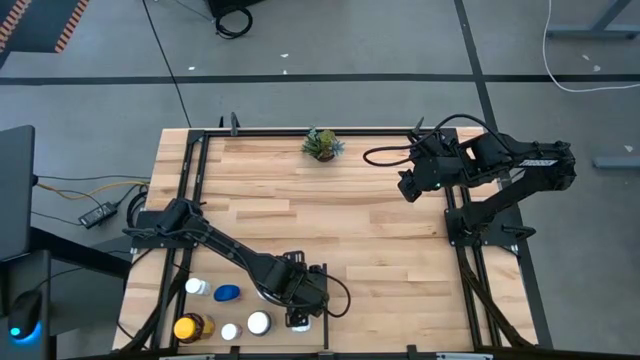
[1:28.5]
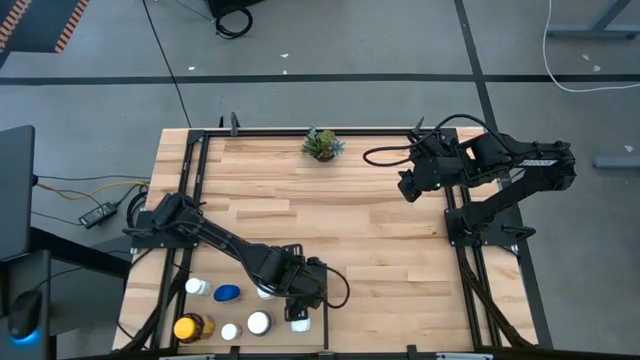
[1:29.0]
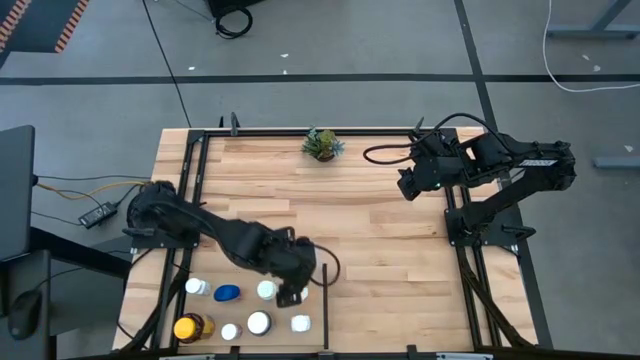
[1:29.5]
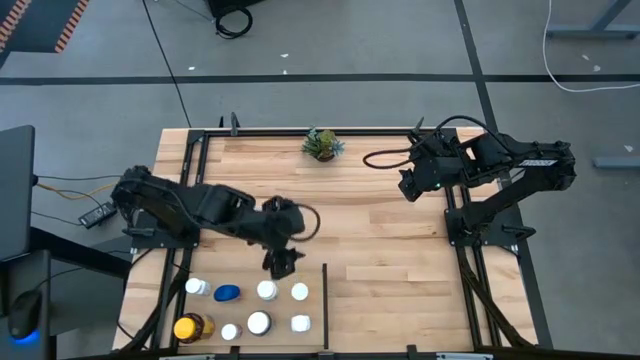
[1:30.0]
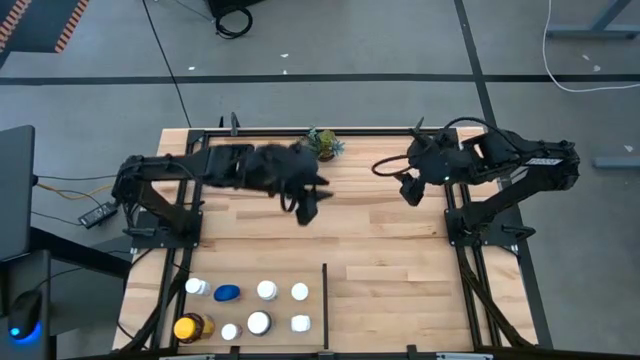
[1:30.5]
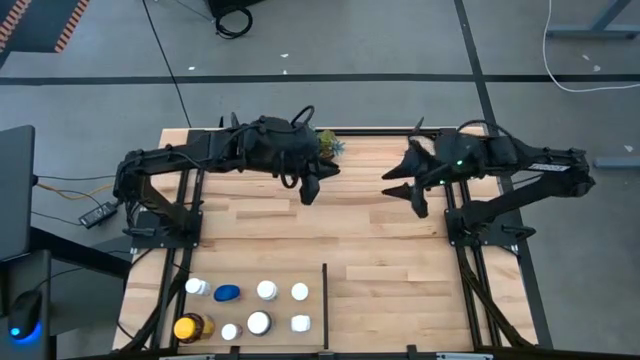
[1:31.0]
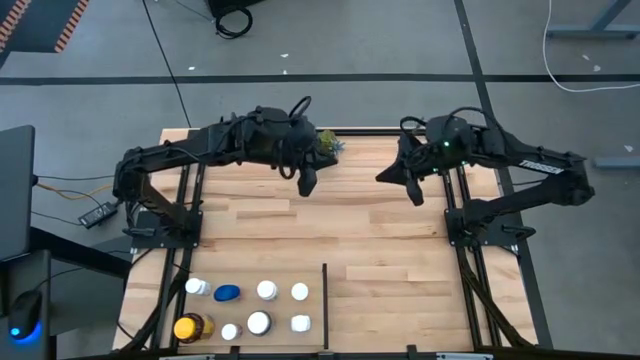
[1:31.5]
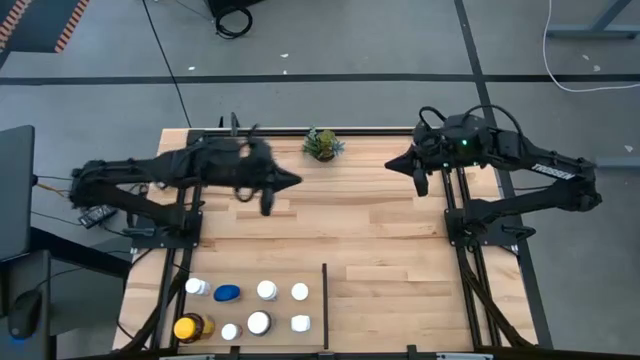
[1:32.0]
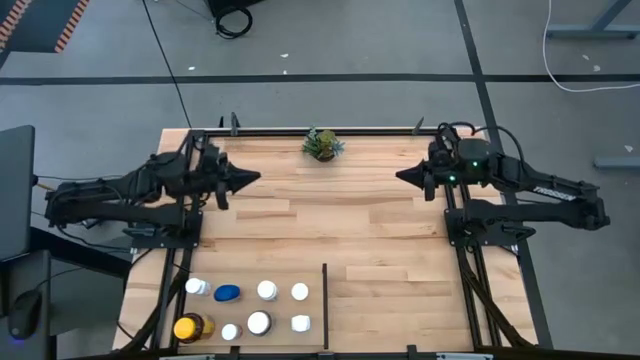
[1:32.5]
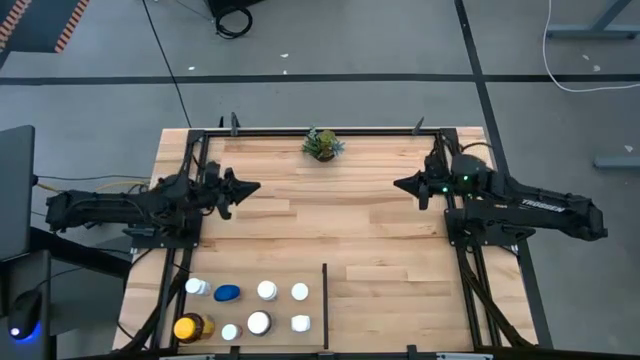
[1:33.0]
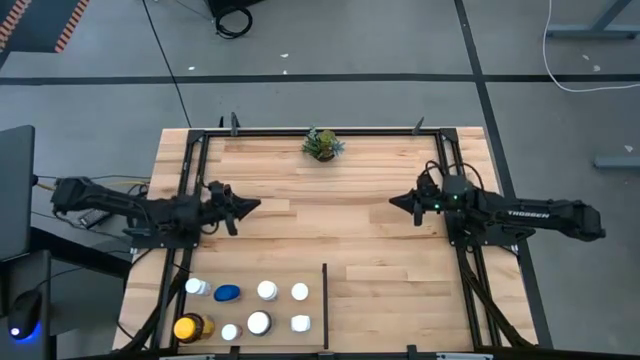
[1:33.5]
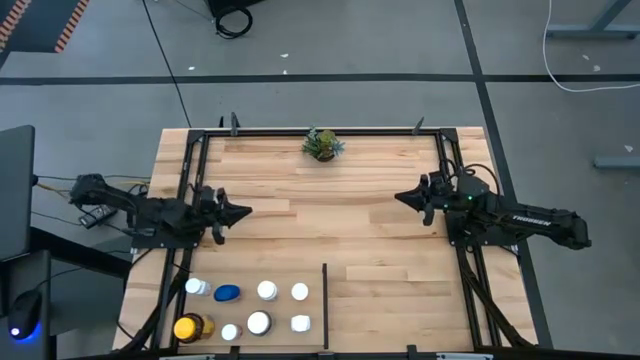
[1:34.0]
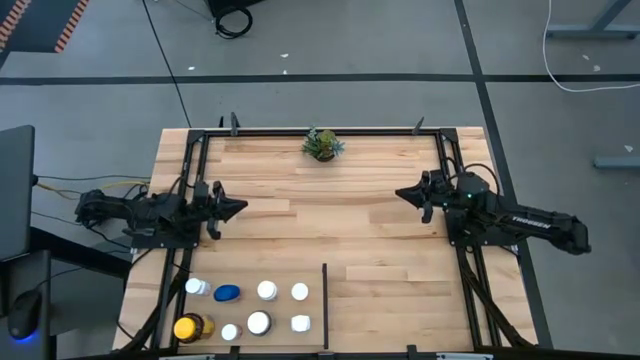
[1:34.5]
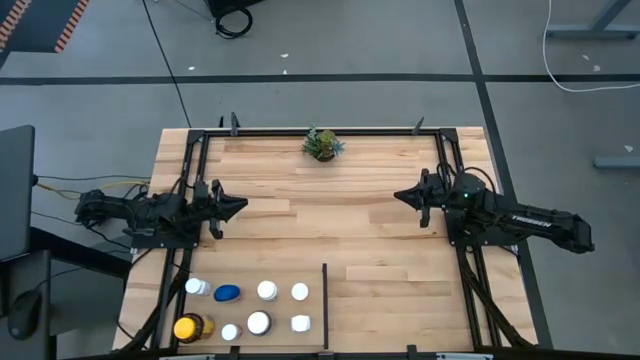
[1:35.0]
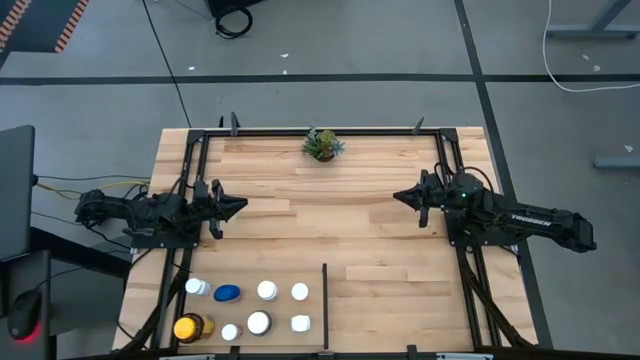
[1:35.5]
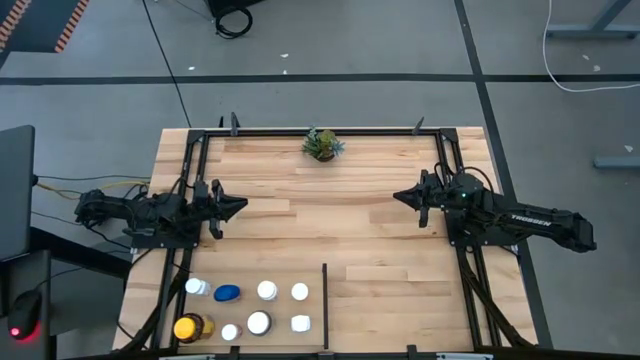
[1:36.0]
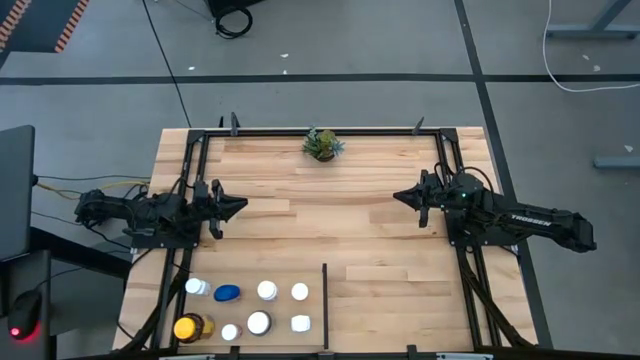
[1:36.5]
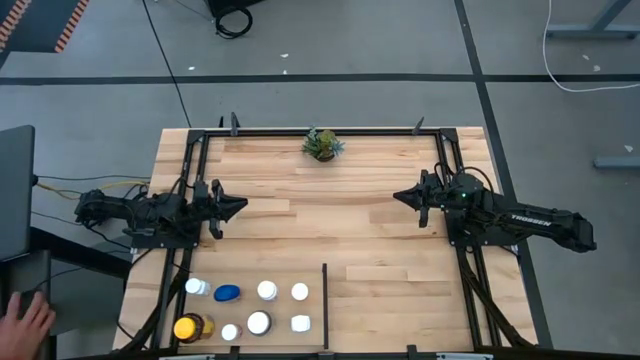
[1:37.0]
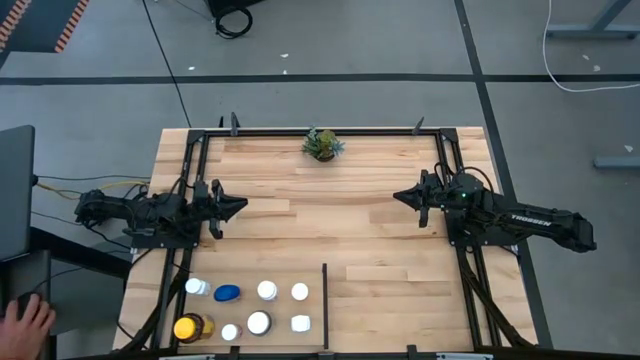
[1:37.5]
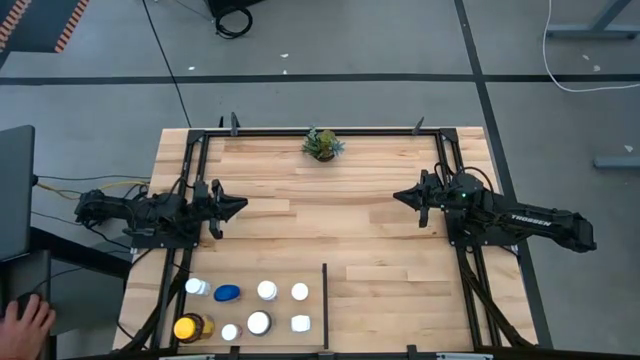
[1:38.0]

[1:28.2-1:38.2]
Task: Pick and place medicine bottles onto shelf by color
Return to Home Position

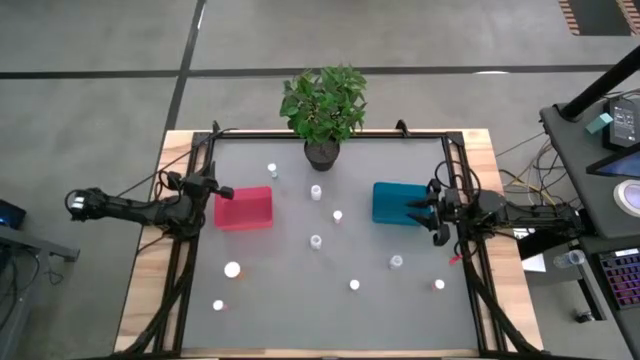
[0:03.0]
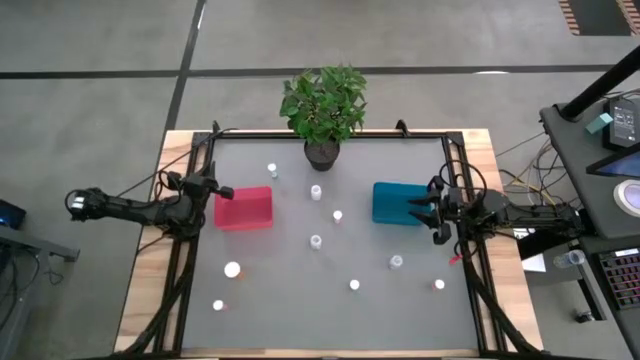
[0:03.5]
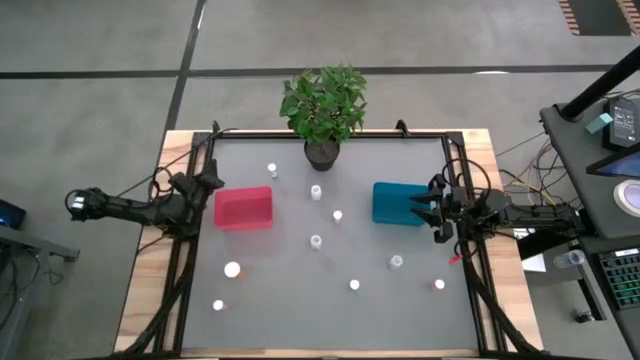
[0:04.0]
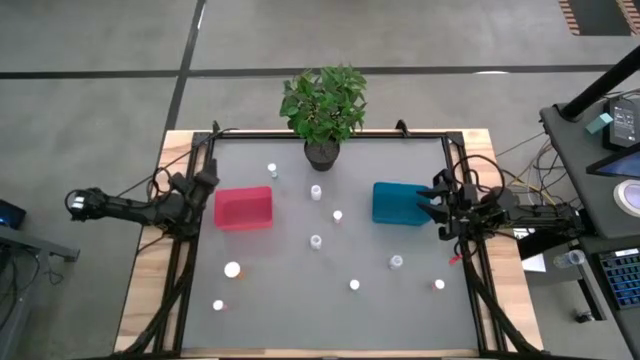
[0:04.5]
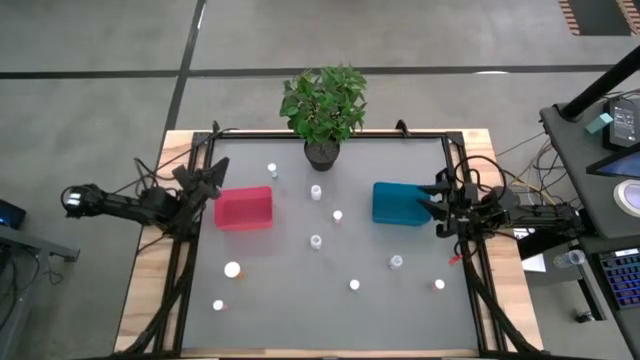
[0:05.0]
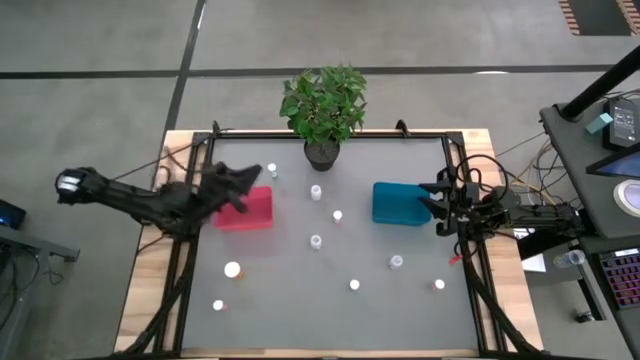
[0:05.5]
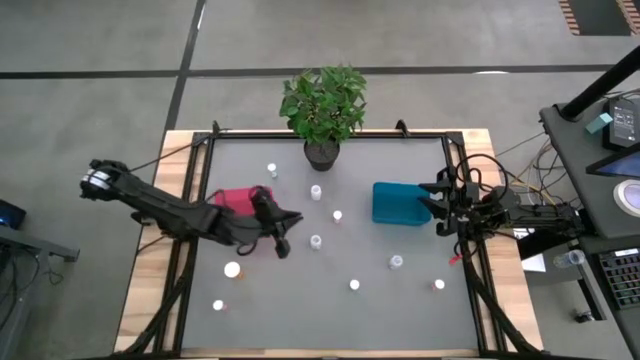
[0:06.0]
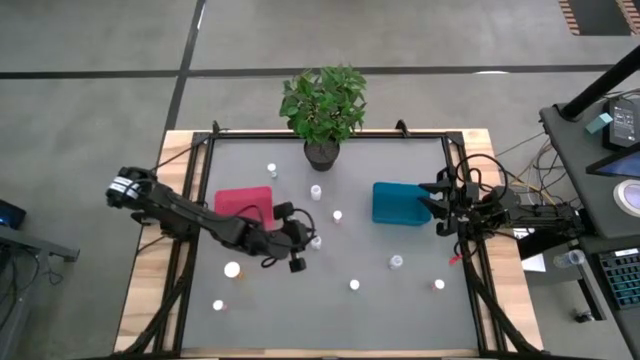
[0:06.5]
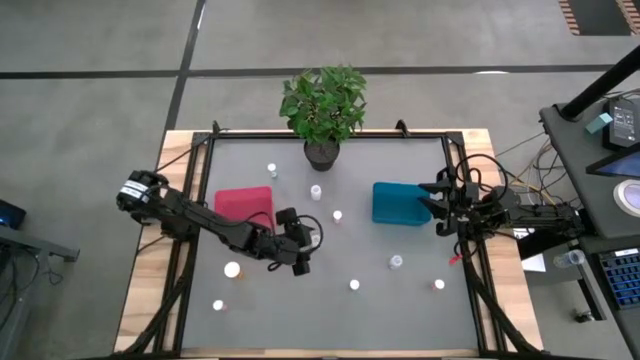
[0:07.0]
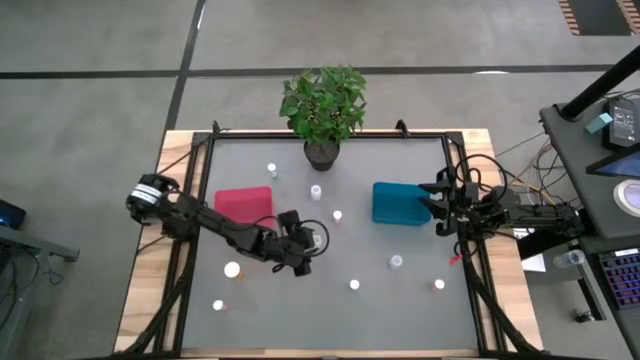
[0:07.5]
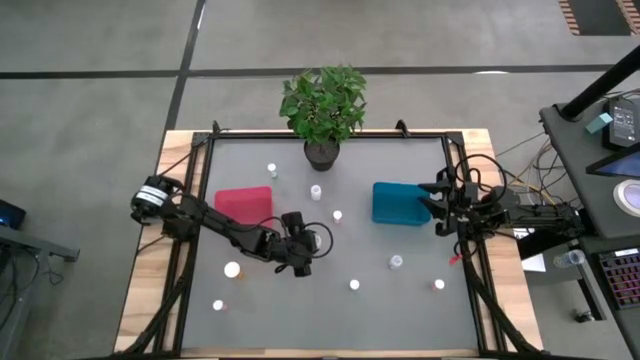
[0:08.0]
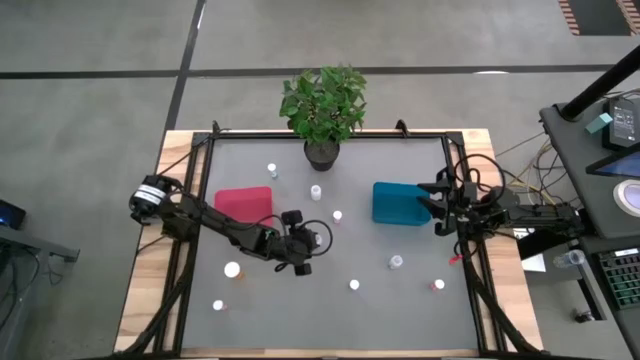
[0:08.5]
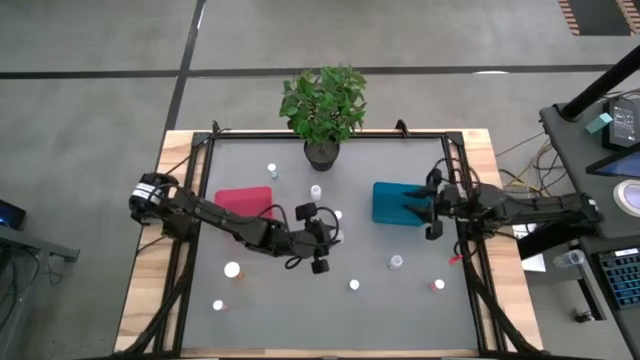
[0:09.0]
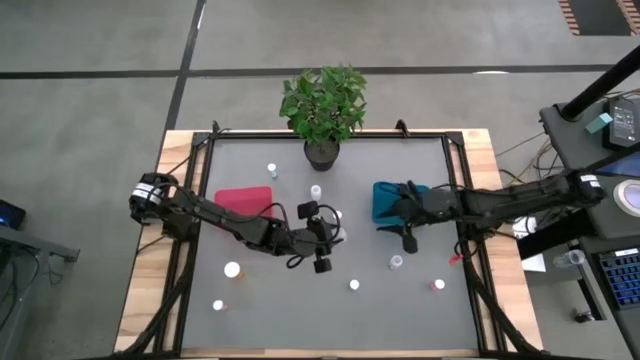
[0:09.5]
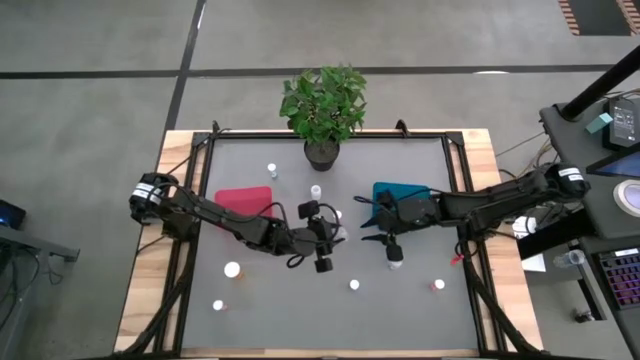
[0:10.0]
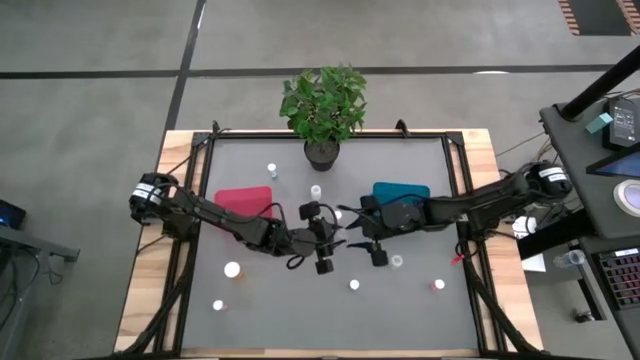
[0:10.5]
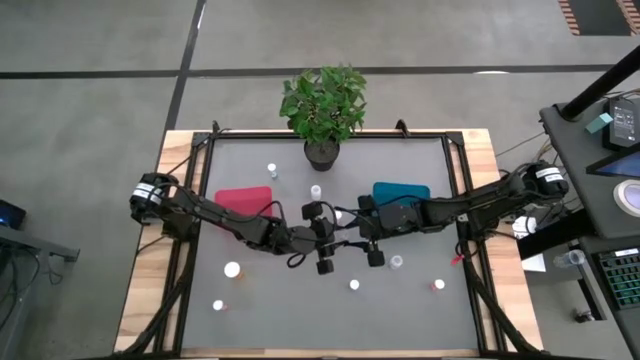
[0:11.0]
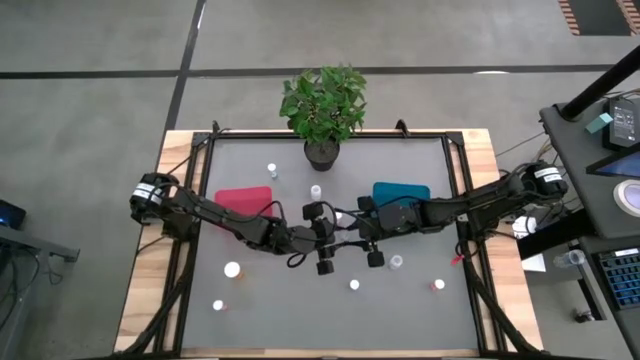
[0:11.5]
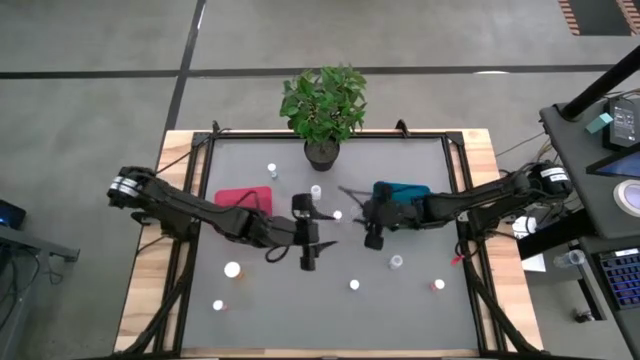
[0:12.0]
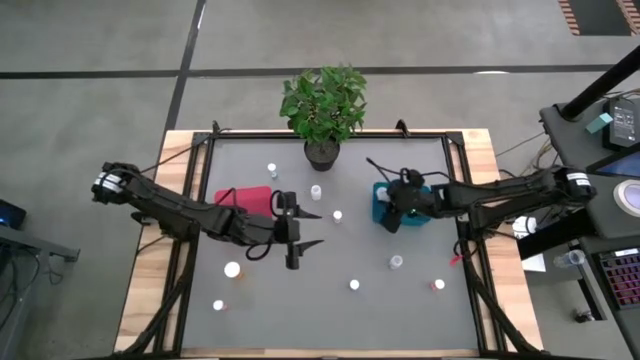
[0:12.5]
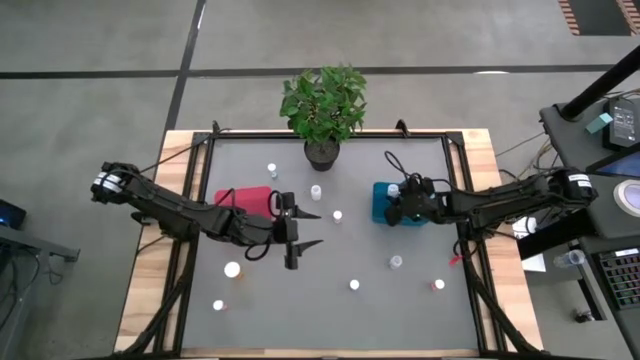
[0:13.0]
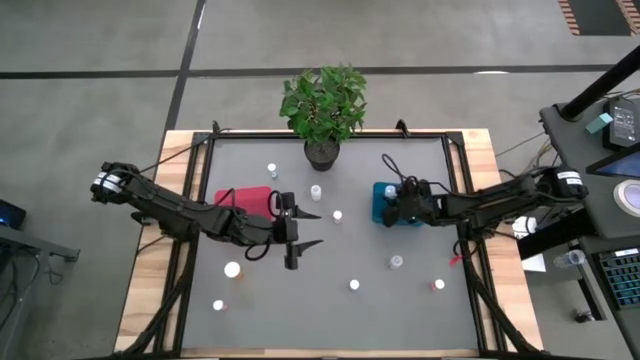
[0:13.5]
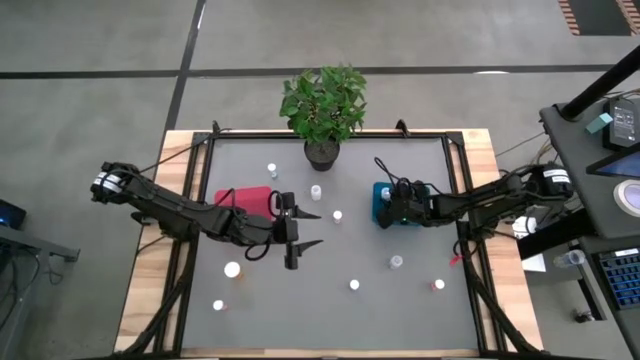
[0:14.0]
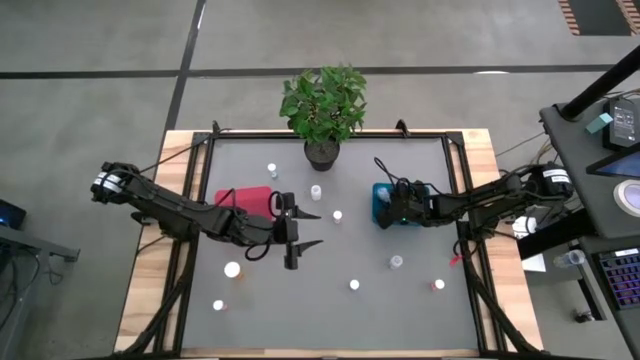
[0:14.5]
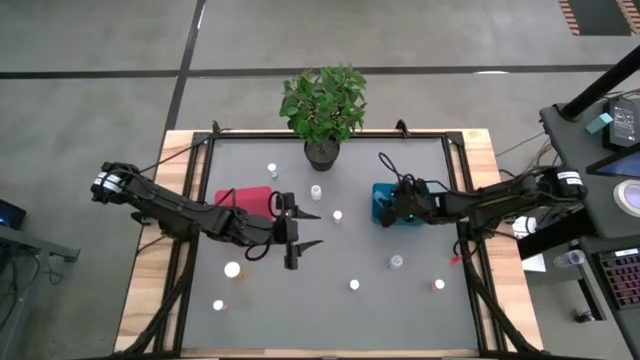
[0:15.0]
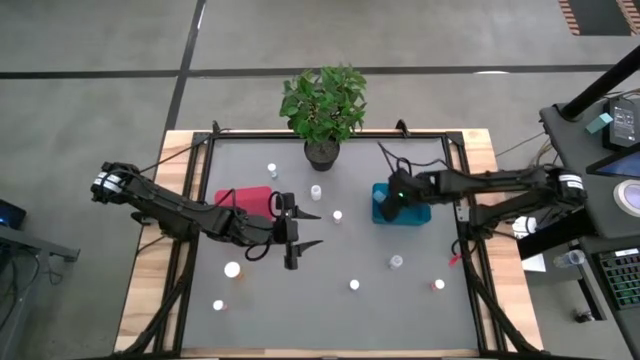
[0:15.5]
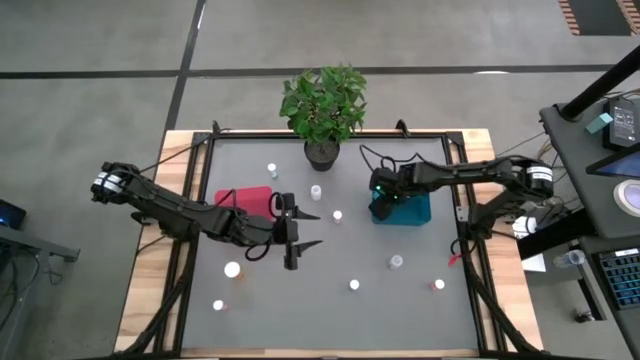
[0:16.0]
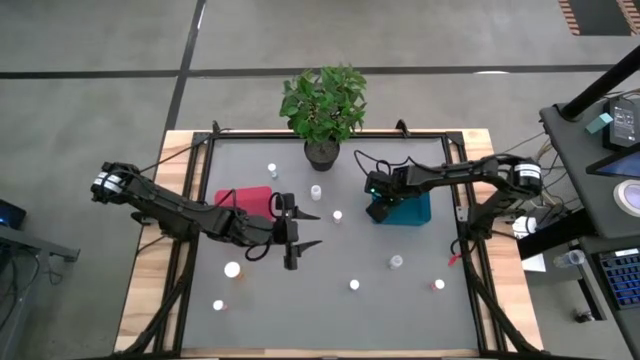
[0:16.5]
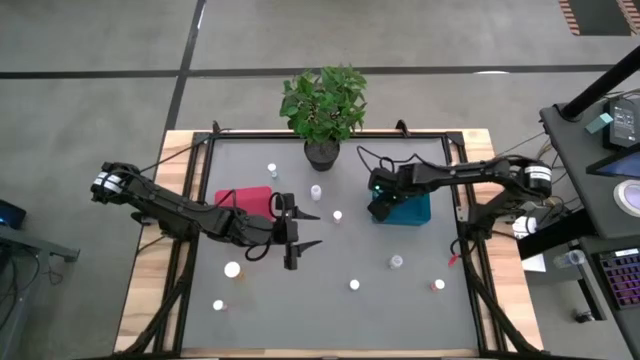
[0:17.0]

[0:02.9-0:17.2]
Task: Pick and place medicine bottles into bin by pill shape (circle, oval)
Put the bottom left transparent capsule bottle into the blue bin
